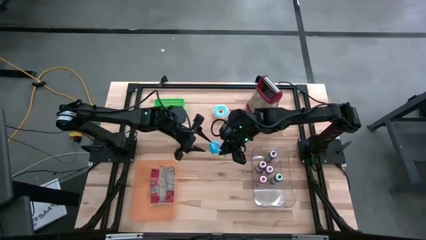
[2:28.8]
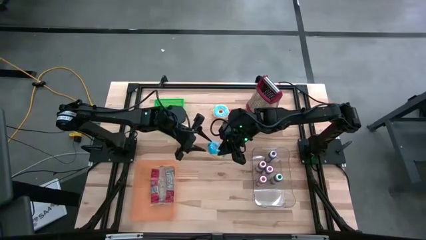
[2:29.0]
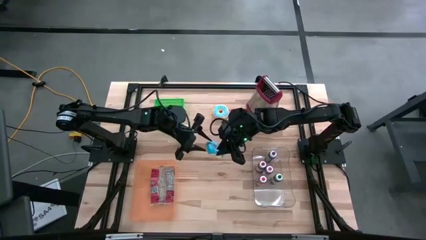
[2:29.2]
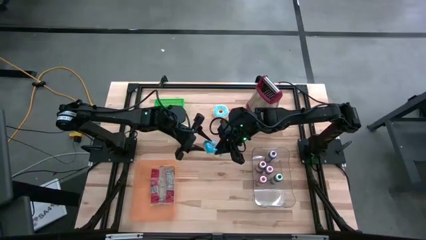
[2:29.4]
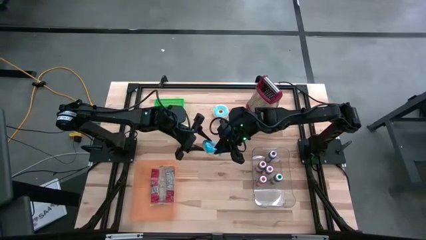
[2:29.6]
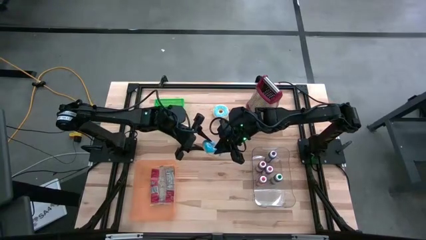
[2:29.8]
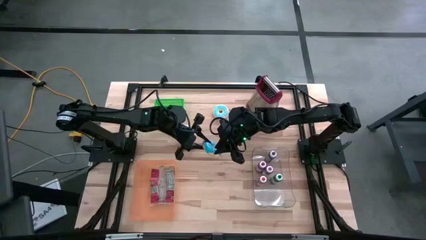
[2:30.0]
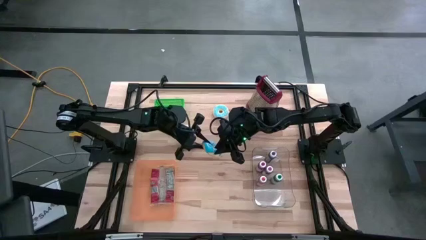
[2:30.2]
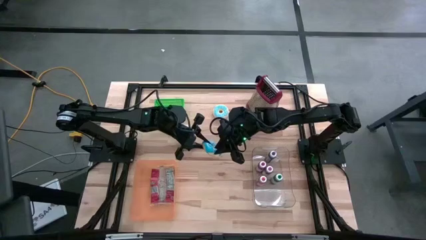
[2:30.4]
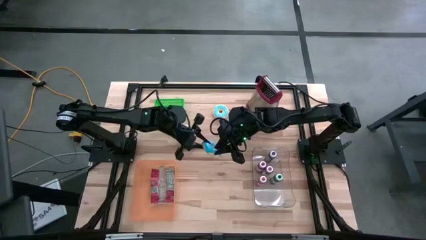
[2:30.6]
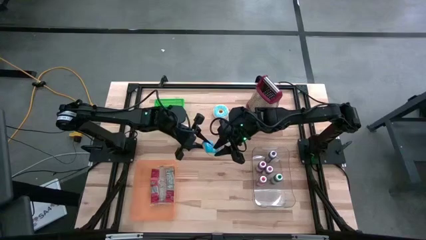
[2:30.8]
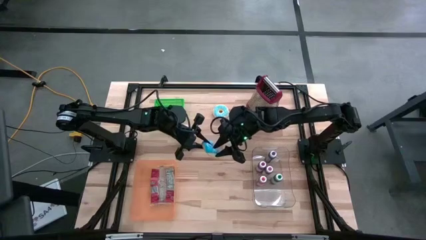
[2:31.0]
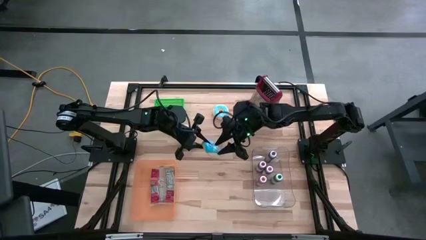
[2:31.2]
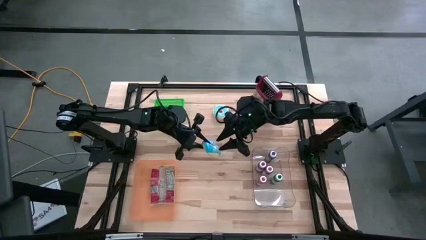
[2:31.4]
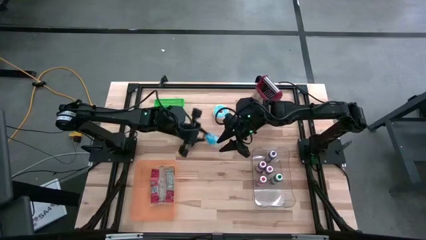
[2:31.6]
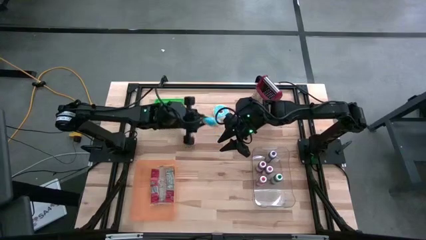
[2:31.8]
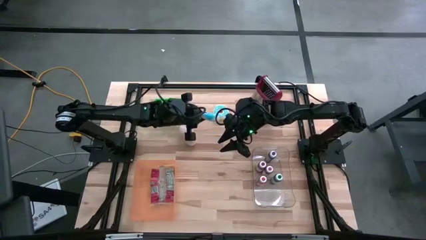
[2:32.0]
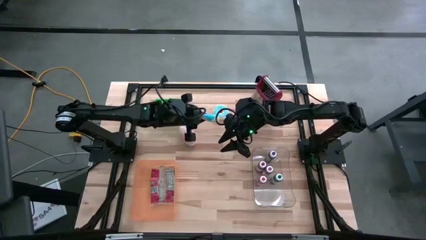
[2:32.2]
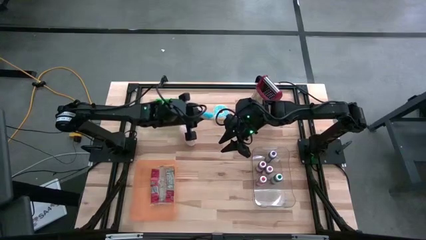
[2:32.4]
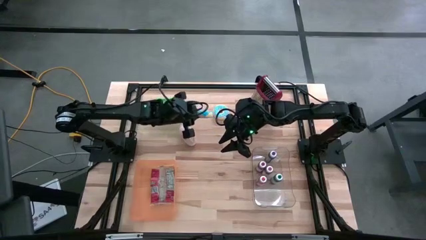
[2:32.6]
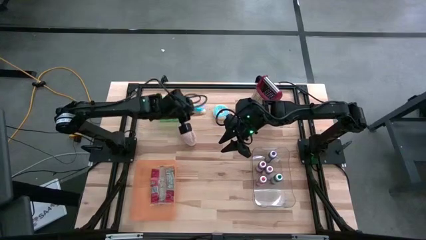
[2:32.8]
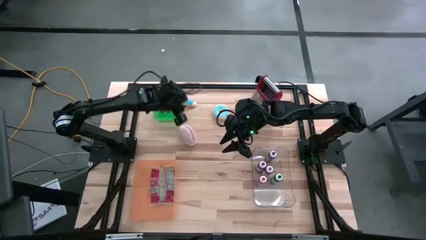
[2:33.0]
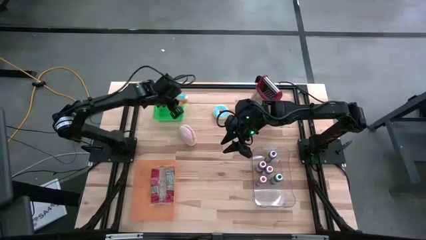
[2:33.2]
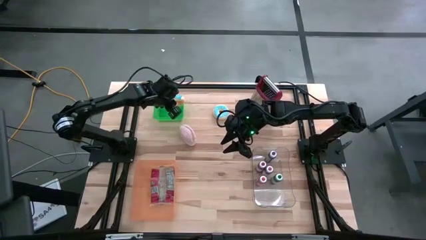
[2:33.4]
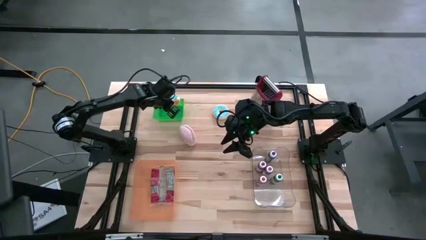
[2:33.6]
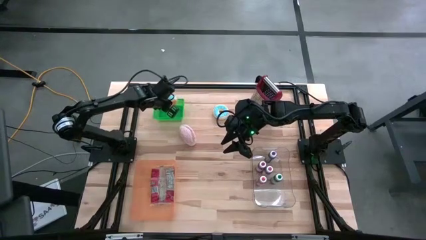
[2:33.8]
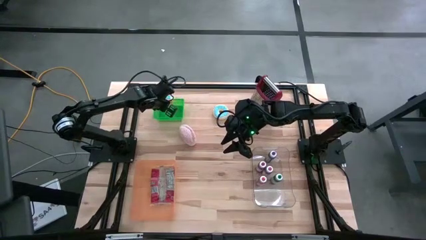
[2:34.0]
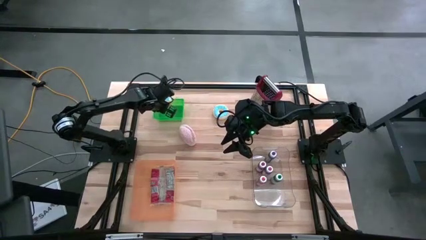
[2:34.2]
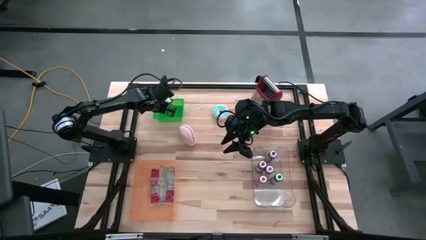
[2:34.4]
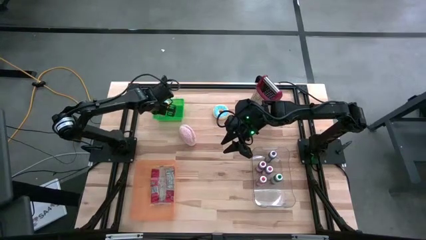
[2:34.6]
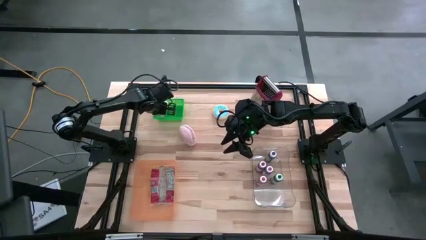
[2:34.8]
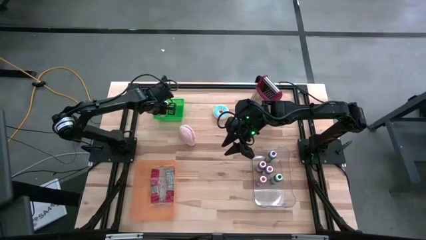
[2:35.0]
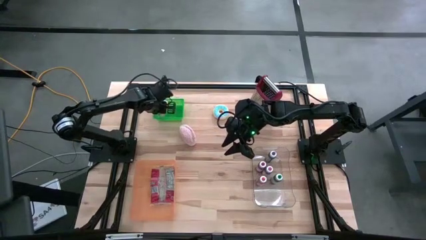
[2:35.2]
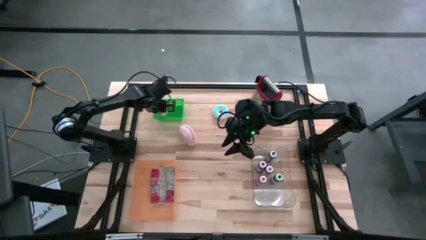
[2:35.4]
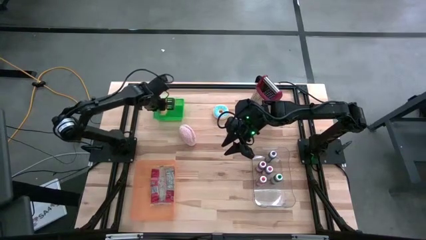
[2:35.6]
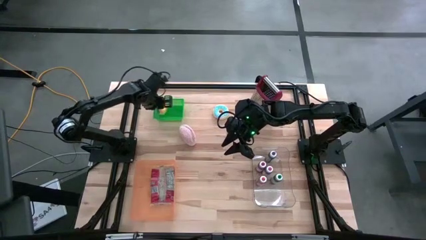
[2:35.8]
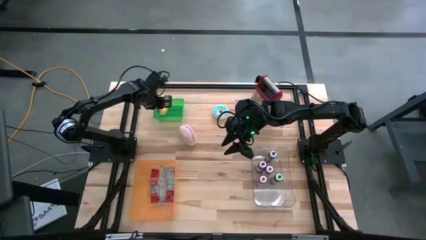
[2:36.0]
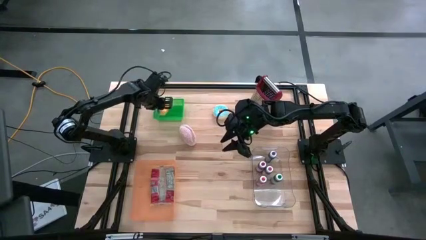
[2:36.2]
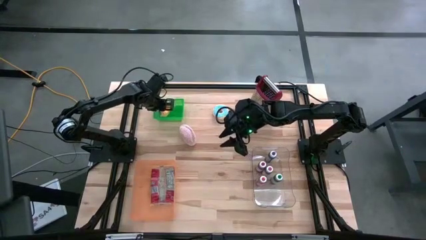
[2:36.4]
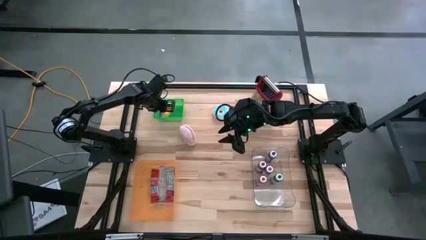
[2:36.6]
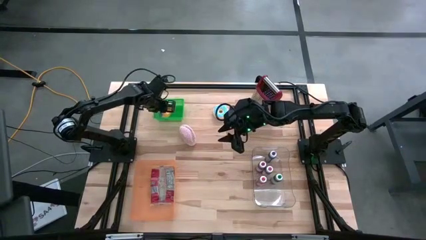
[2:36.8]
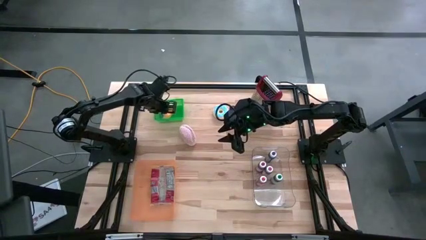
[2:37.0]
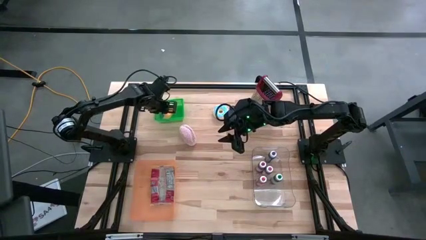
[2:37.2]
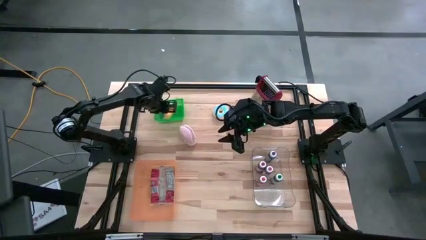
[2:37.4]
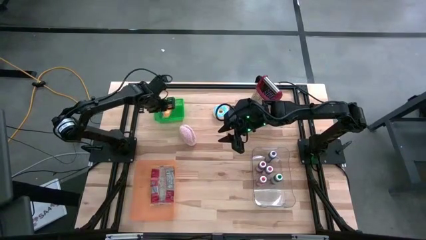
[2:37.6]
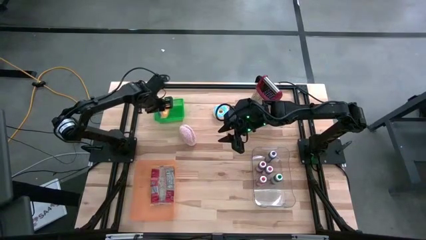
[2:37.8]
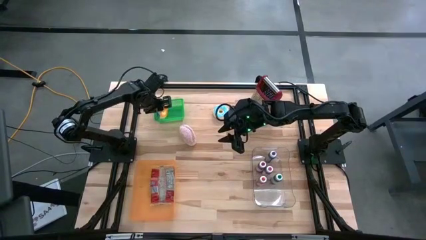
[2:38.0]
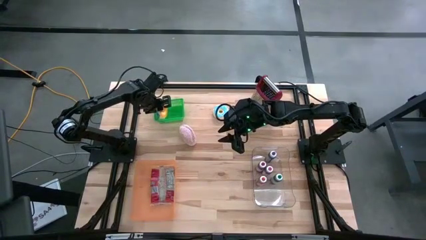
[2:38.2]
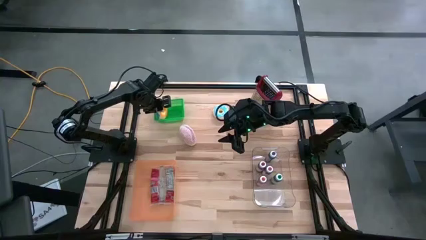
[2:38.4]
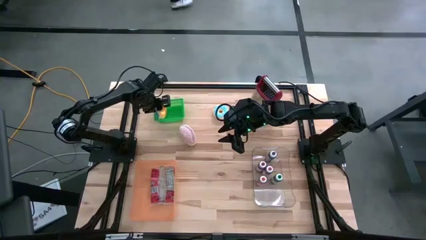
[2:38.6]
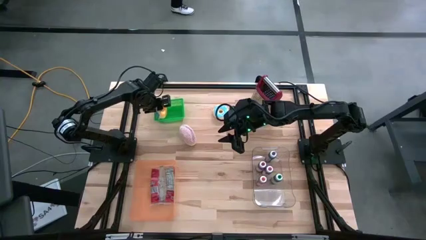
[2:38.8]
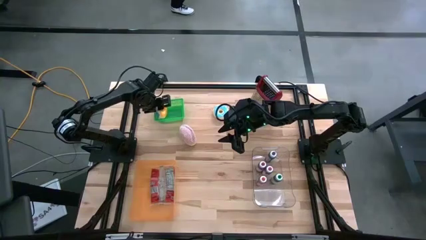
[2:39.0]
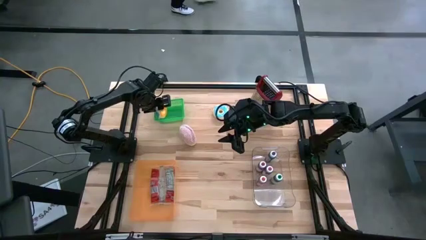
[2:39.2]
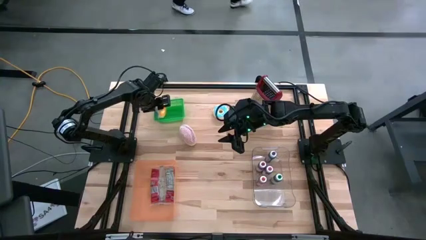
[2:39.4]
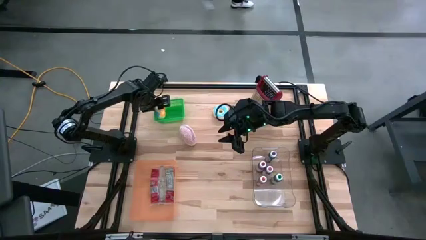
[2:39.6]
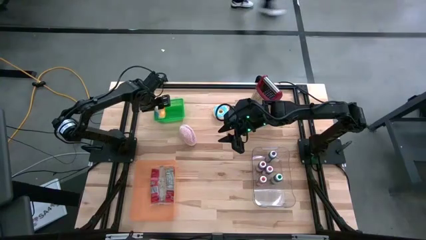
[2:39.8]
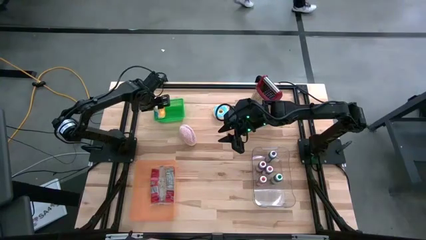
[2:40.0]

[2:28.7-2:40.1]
Put the blue donut into the green basket
